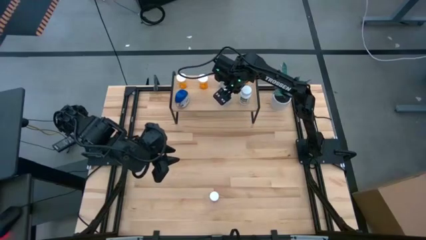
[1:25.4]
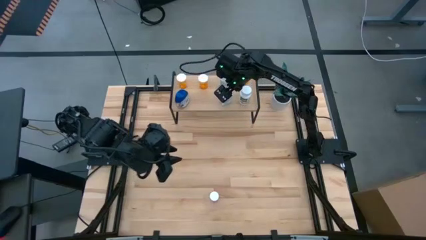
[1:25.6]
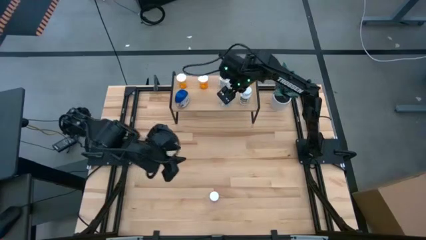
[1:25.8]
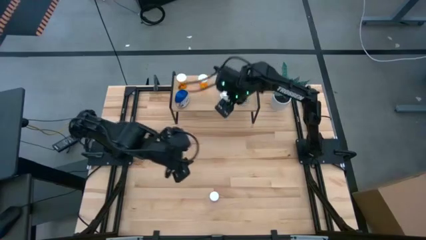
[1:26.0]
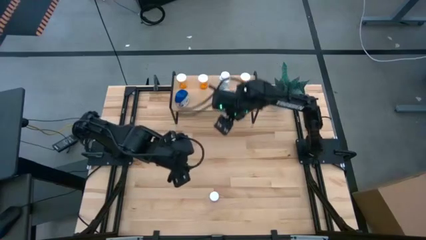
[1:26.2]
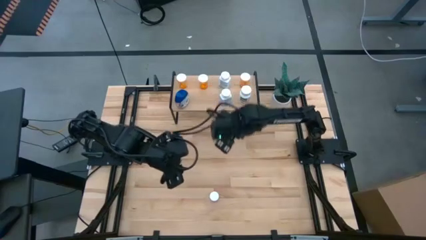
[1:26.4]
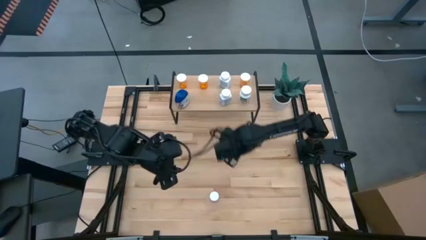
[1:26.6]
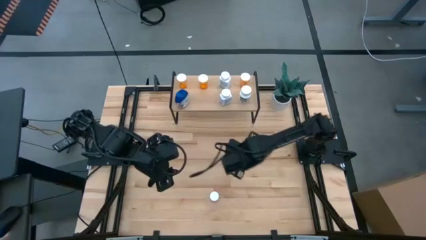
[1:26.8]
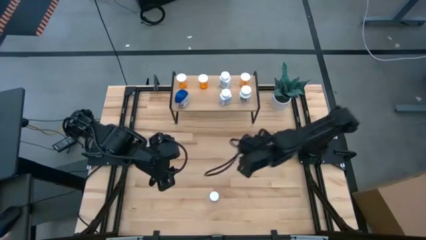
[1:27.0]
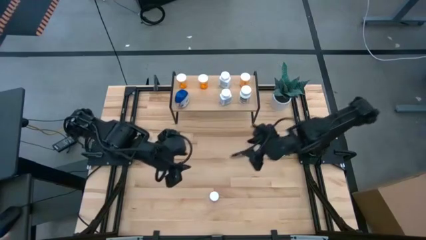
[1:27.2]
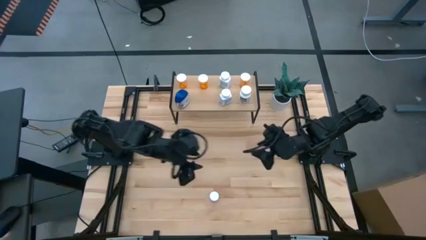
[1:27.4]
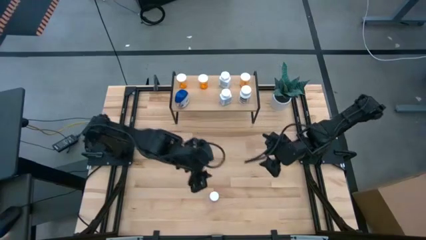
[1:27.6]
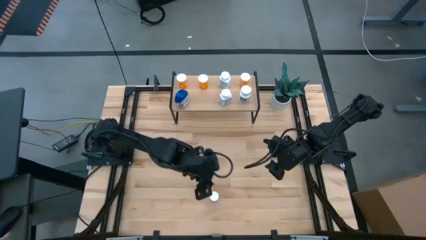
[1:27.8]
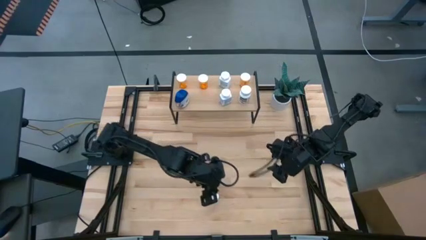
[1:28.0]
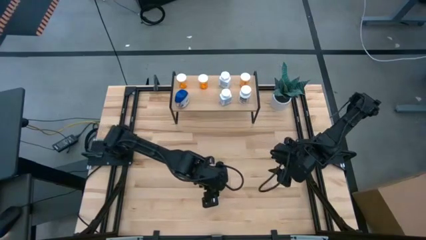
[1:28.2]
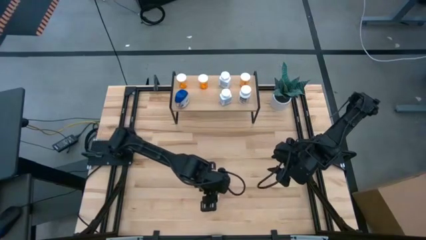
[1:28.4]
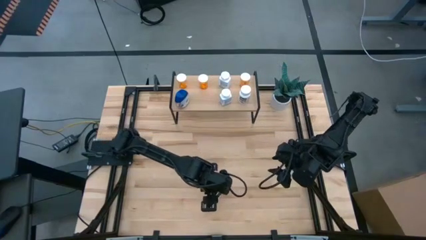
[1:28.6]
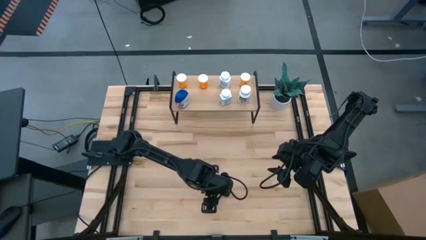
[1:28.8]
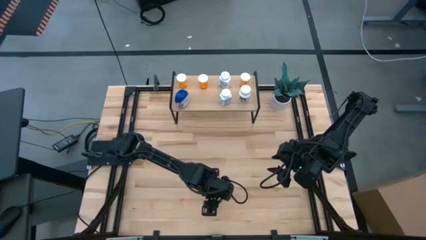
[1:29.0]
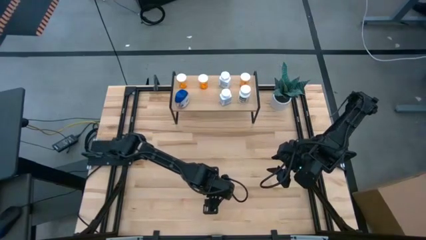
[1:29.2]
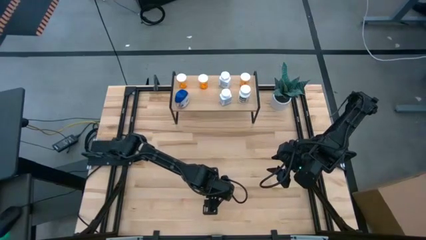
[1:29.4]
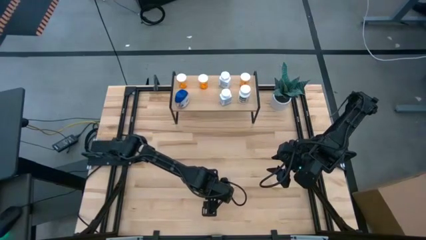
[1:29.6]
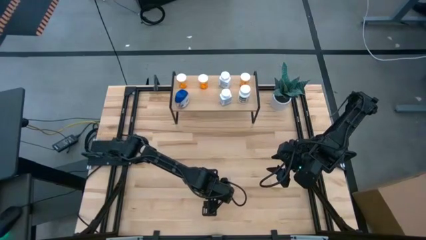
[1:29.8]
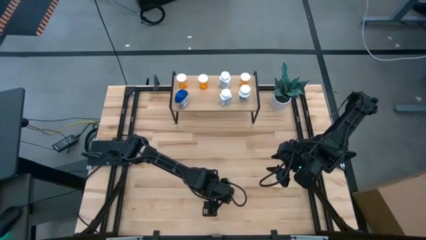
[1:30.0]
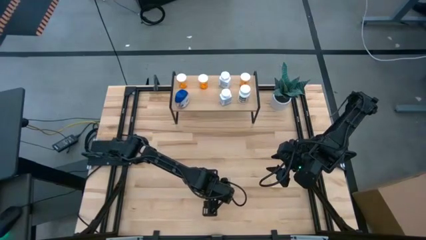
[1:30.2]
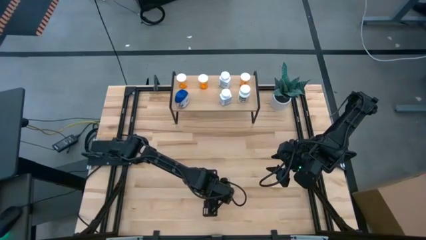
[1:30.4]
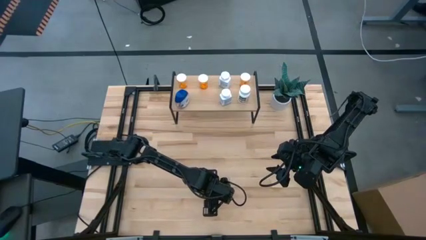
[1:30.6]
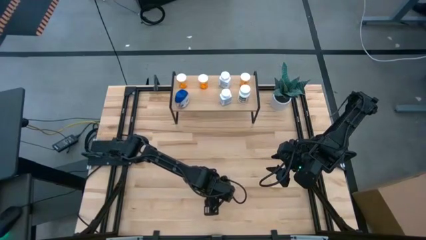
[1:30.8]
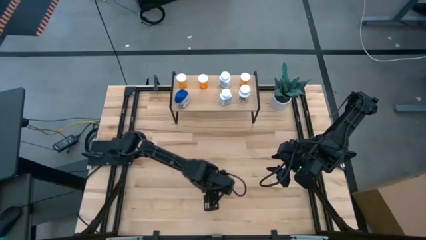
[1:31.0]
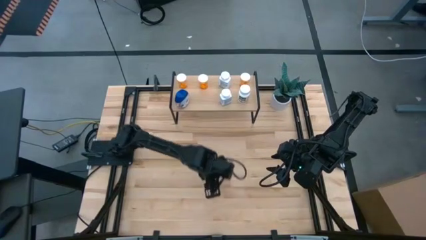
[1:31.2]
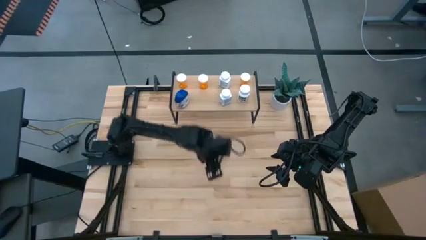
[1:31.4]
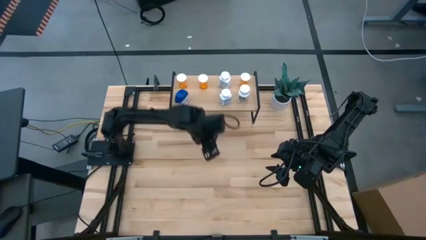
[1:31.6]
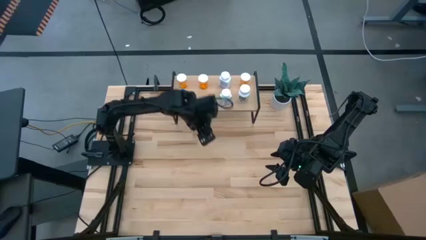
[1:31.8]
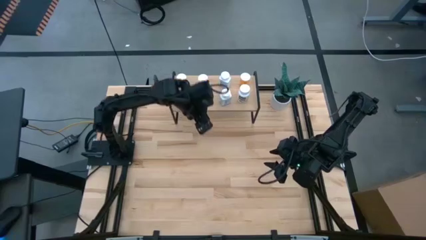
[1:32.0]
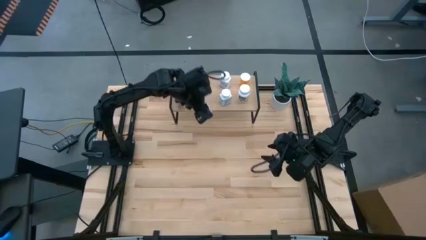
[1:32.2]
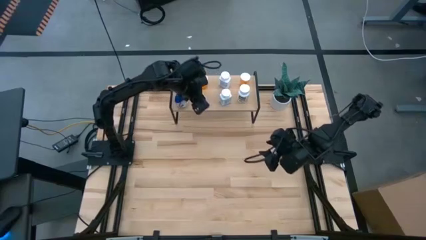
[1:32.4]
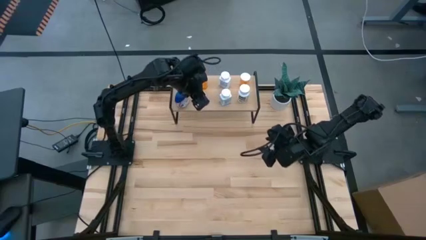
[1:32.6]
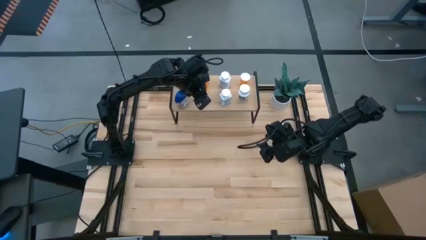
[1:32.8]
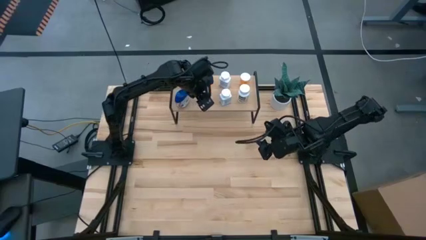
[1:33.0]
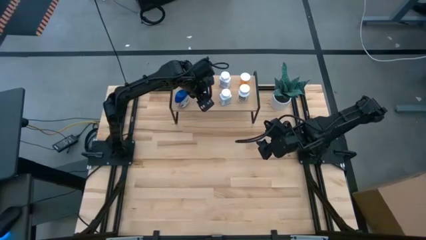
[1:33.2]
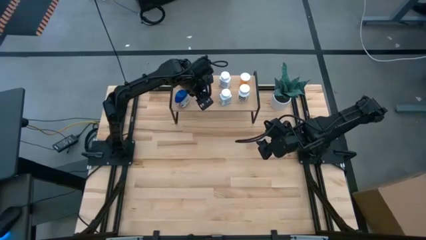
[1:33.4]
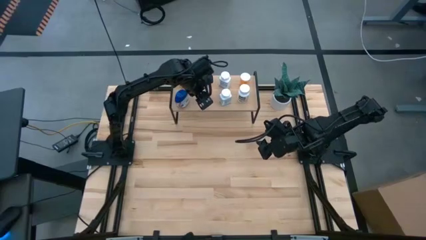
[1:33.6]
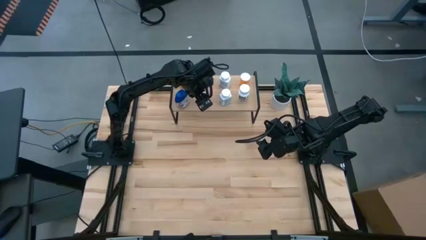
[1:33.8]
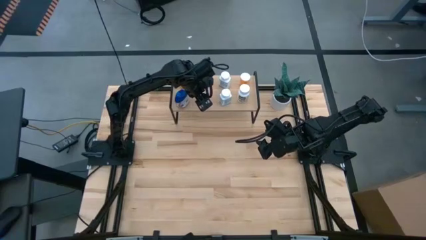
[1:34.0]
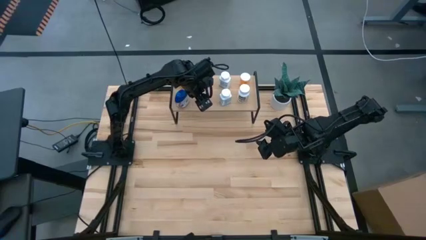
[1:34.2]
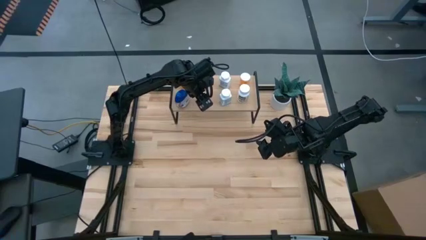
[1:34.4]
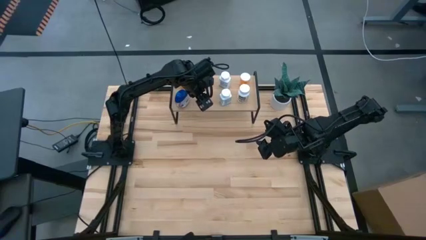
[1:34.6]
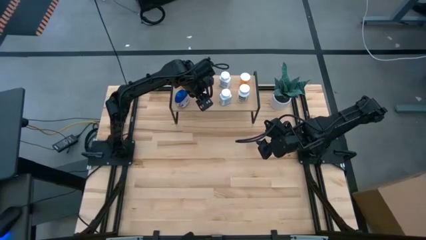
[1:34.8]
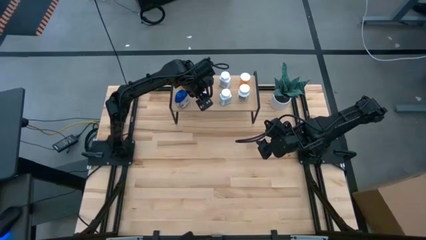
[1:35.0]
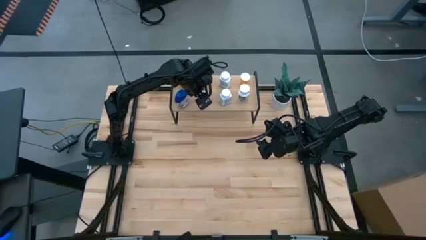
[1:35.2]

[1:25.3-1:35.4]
Task: Pick and place medicine bottles onto shelf by color
Put the pink bottle on the shelf
